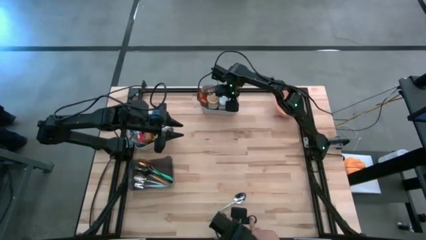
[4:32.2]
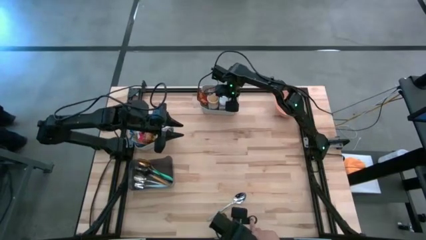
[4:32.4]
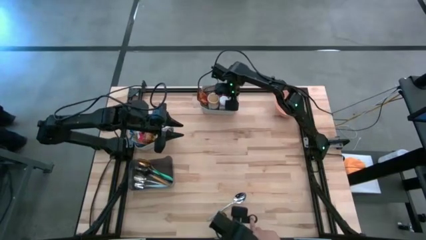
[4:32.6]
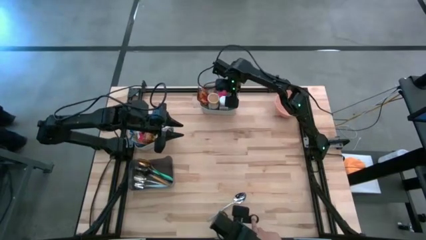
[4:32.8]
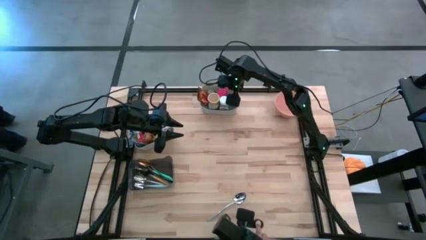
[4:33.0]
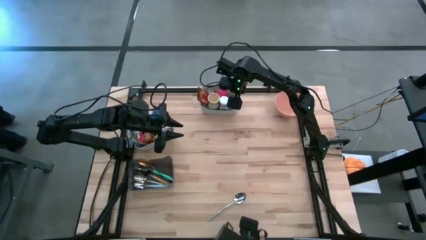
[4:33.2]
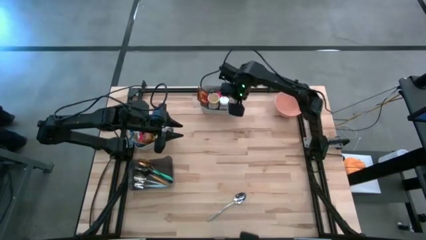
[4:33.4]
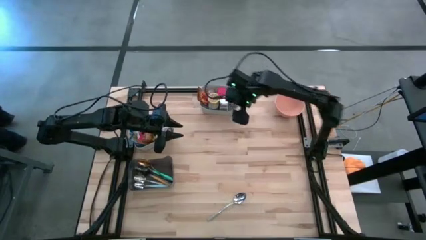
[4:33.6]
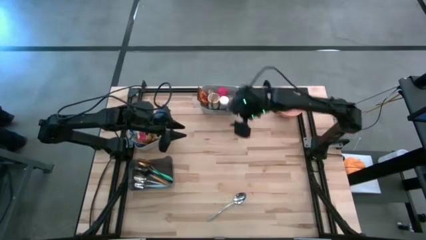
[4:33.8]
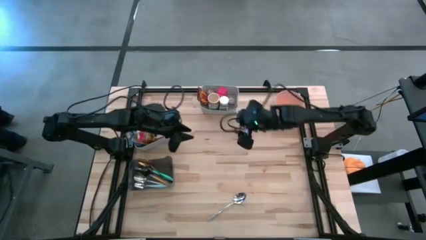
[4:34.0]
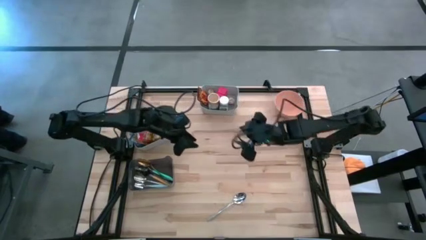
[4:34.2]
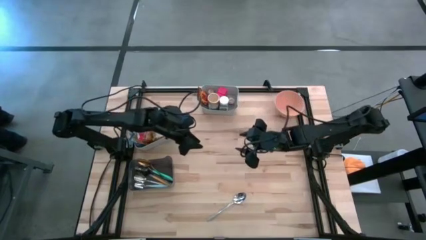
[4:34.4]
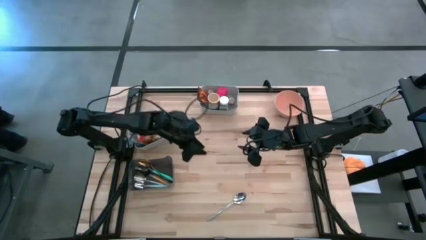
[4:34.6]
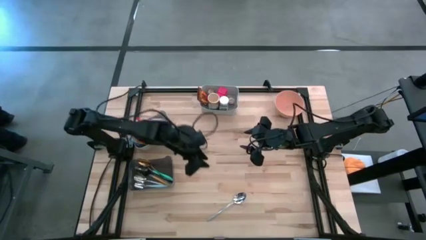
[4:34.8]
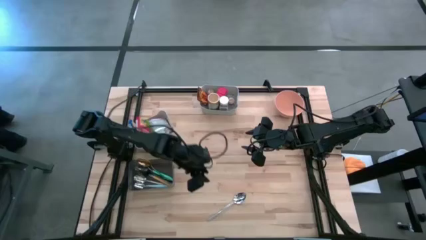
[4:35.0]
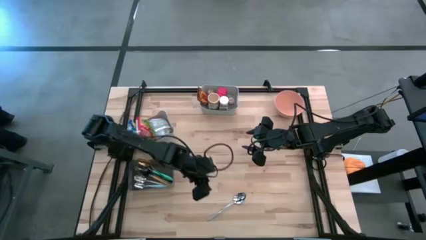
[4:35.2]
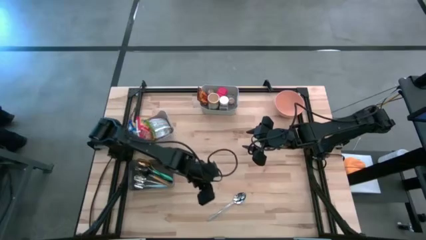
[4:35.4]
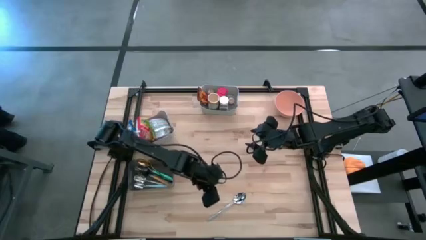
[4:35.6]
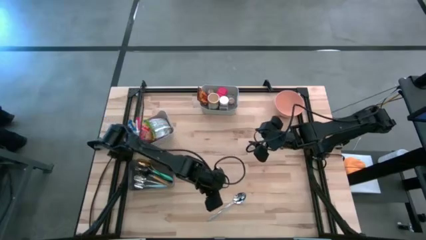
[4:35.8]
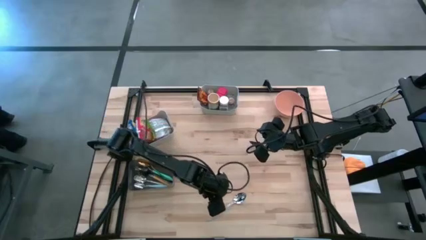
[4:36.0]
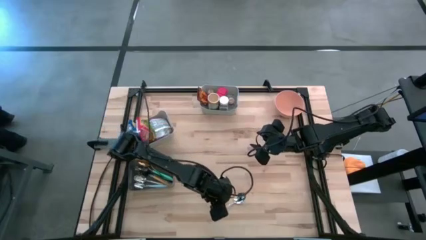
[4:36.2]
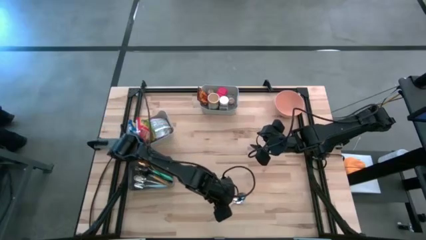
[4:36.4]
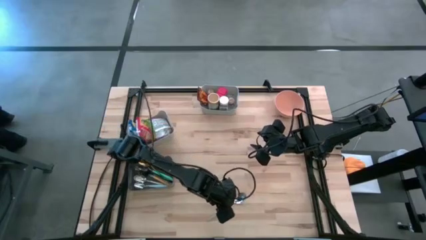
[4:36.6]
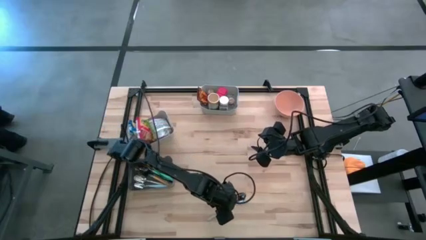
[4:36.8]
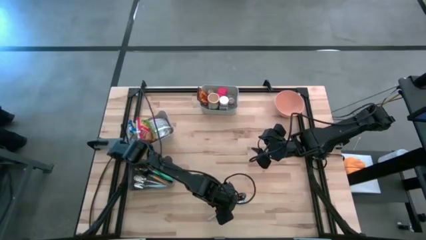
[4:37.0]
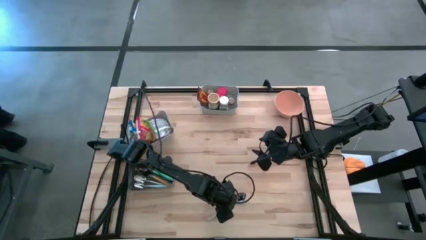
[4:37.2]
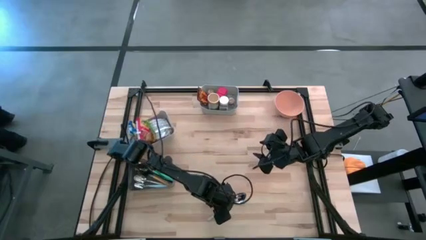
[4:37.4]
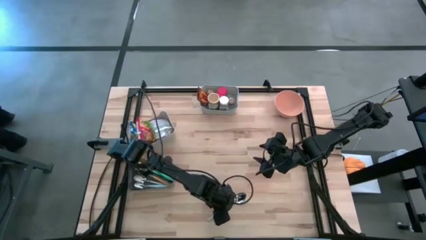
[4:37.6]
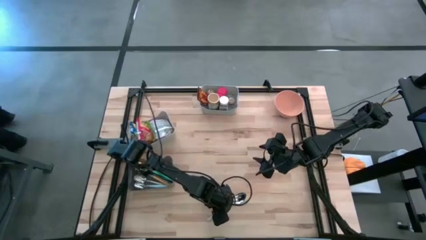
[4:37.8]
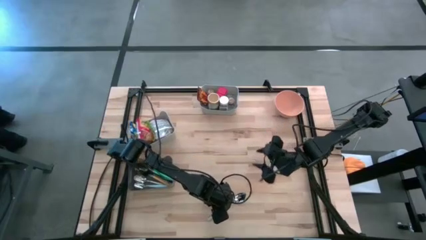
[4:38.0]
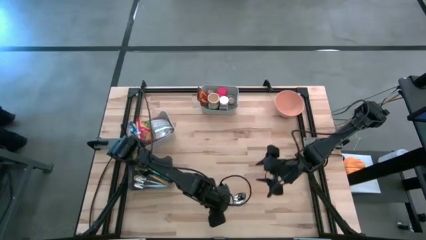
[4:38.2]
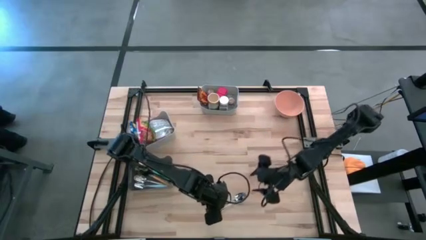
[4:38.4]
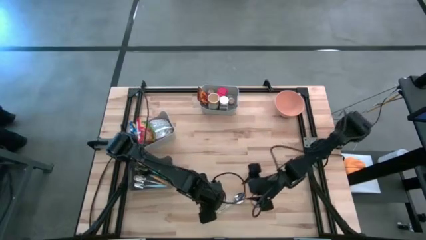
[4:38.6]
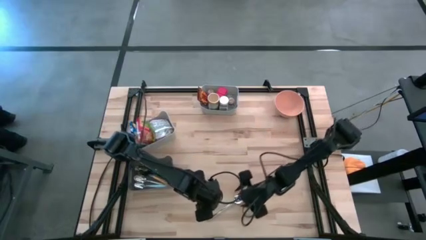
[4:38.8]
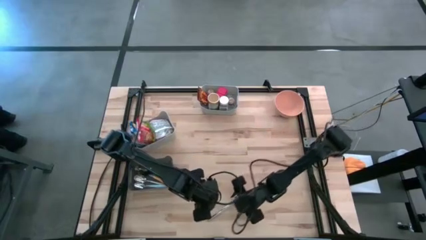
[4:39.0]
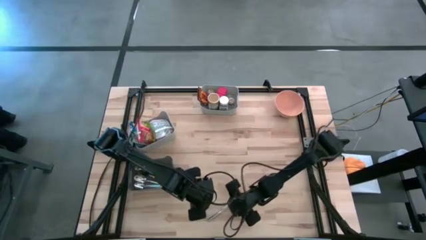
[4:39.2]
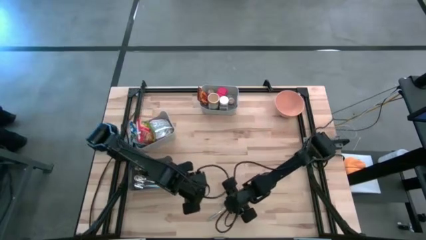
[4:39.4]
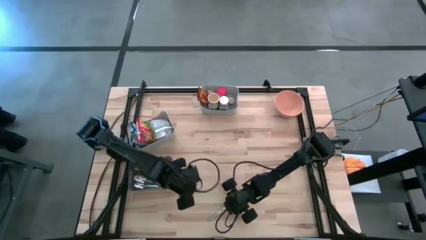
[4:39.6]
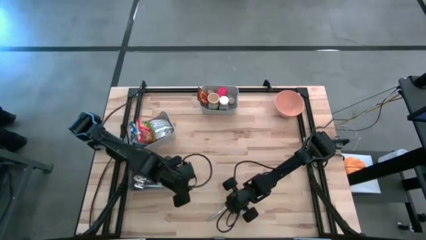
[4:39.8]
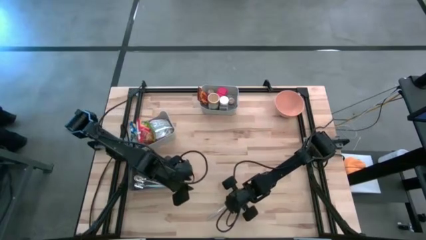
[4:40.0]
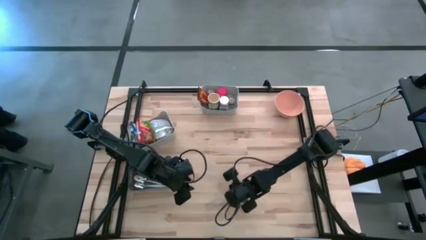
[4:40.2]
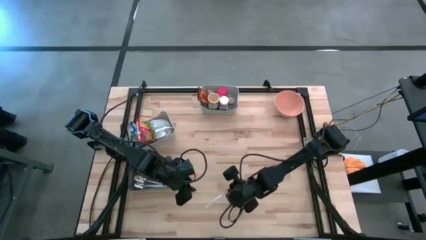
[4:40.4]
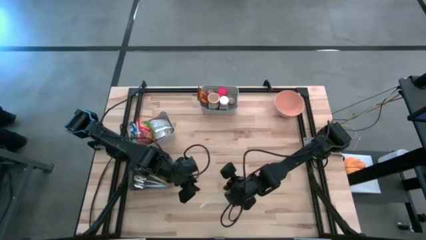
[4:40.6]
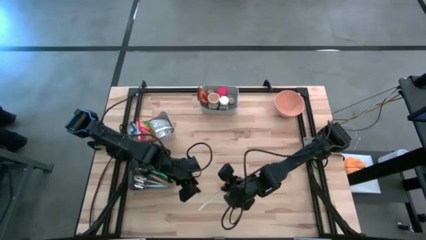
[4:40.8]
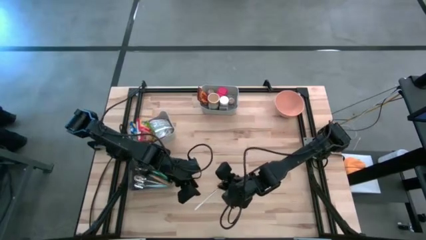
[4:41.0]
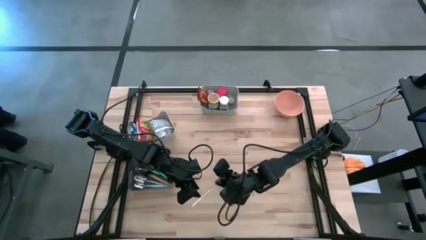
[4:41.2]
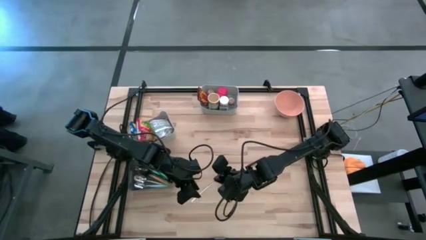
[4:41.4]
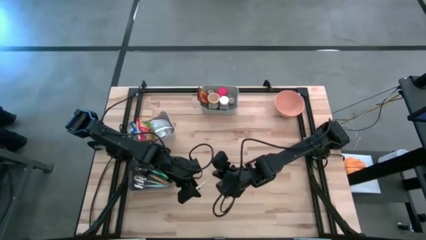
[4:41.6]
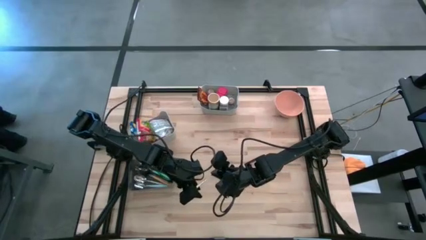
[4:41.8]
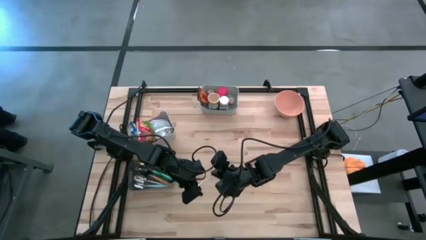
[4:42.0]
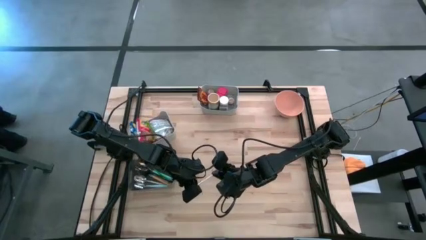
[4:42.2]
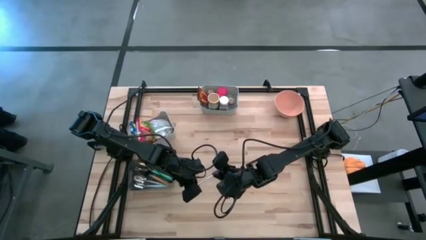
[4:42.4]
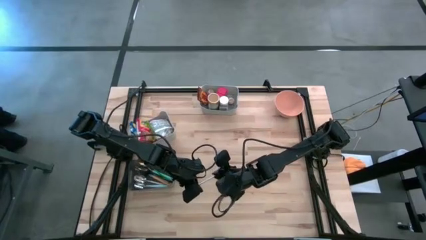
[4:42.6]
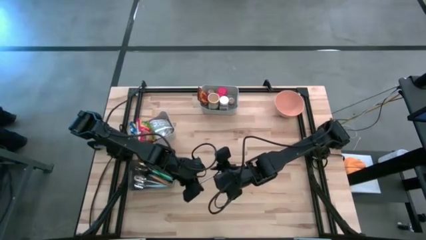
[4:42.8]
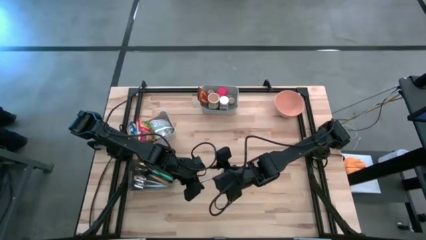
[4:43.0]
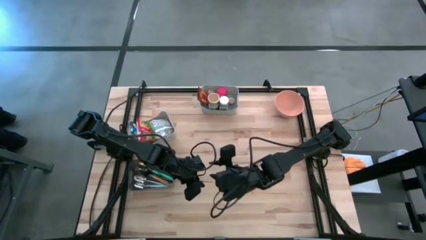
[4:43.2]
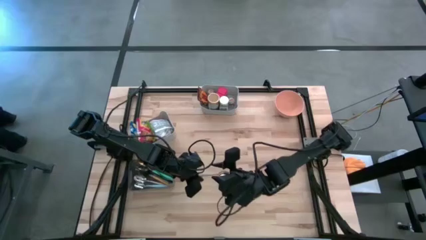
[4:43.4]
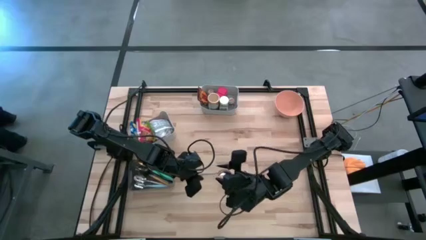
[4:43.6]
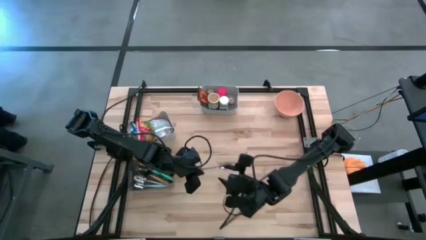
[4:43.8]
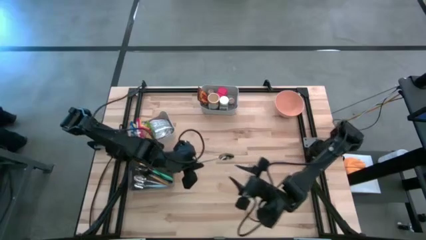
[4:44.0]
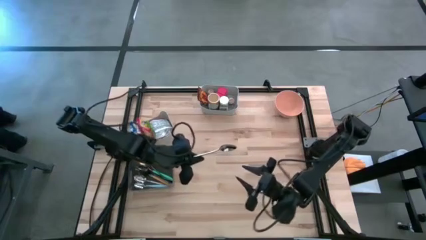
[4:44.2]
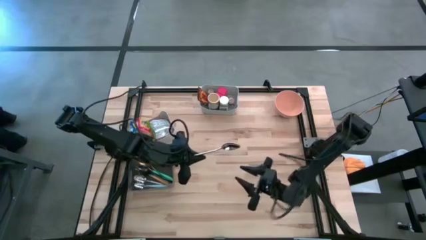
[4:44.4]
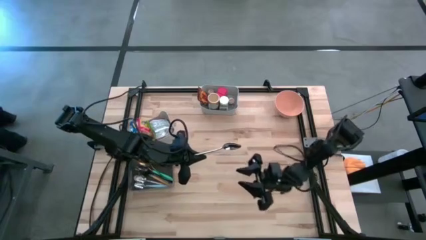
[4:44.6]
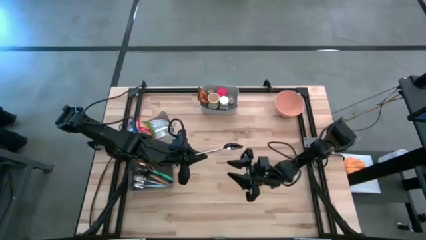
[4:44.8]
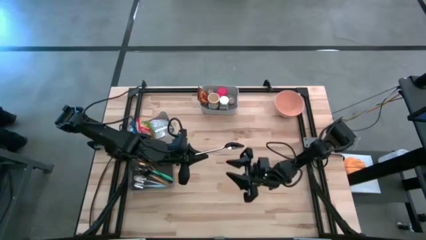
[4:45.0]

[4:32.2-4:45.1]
Put the silver spoon into the black bin
